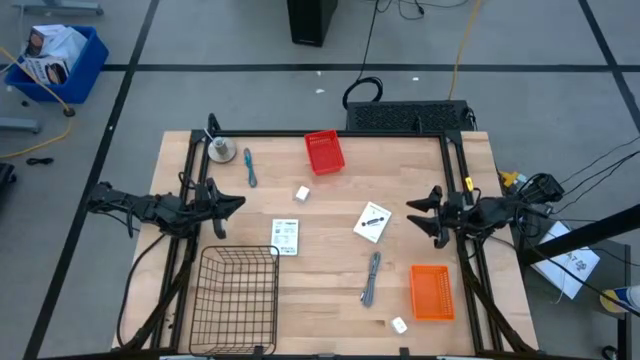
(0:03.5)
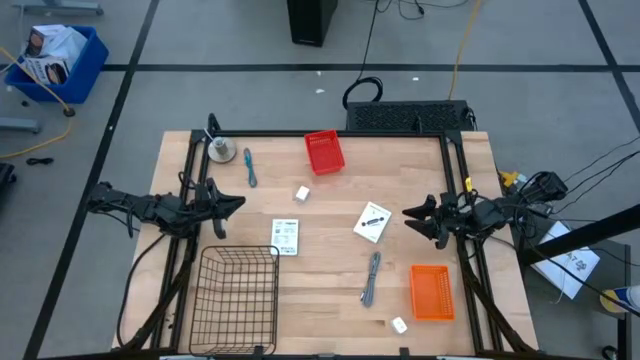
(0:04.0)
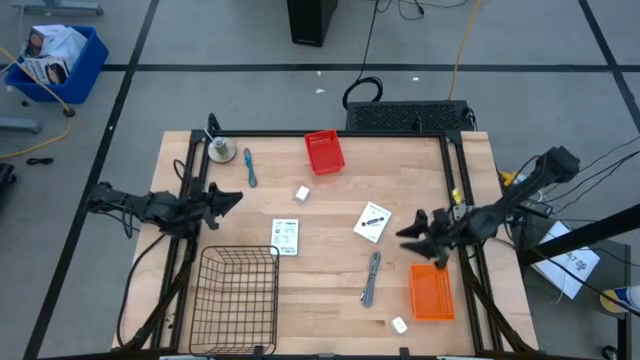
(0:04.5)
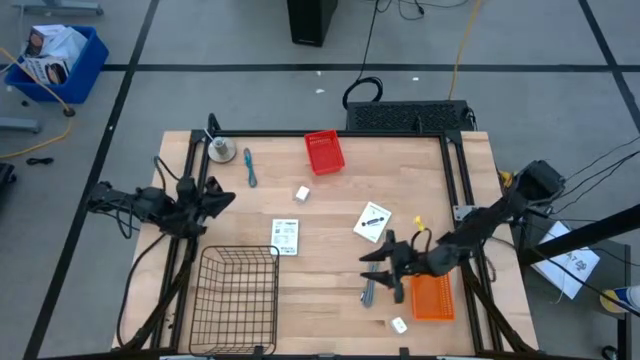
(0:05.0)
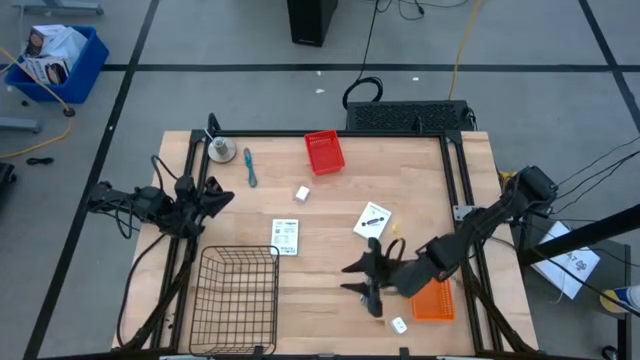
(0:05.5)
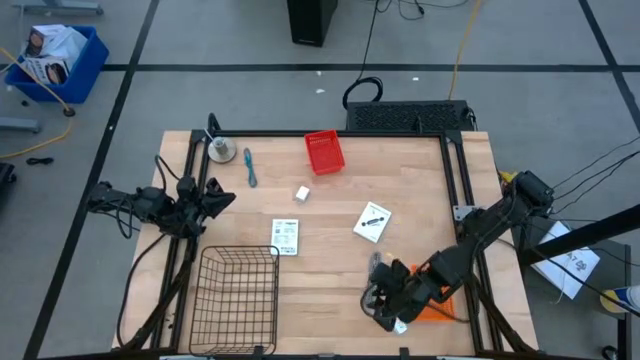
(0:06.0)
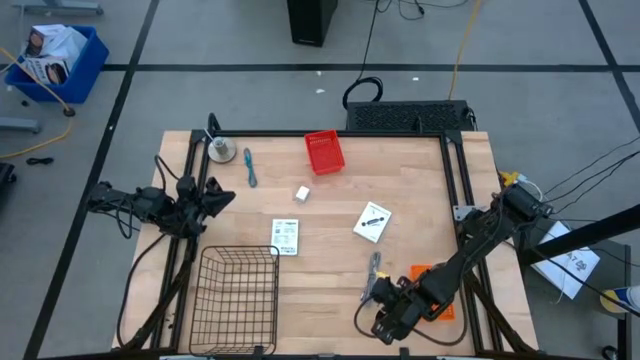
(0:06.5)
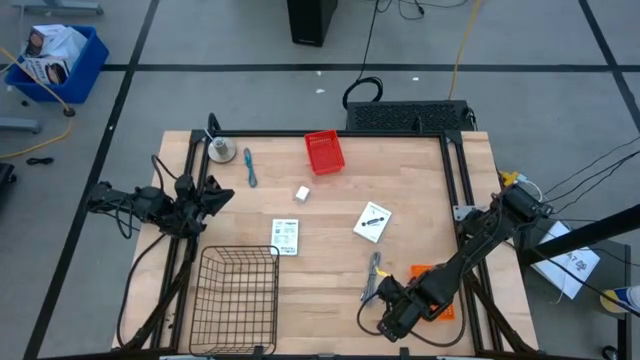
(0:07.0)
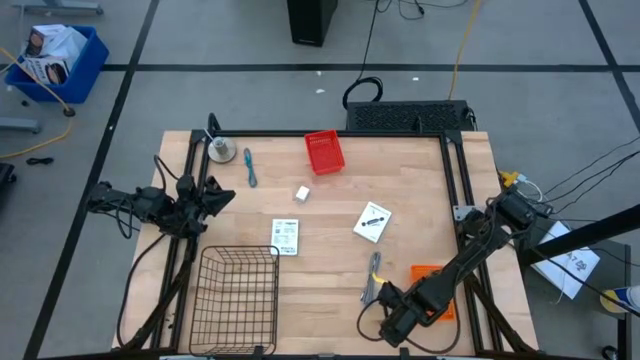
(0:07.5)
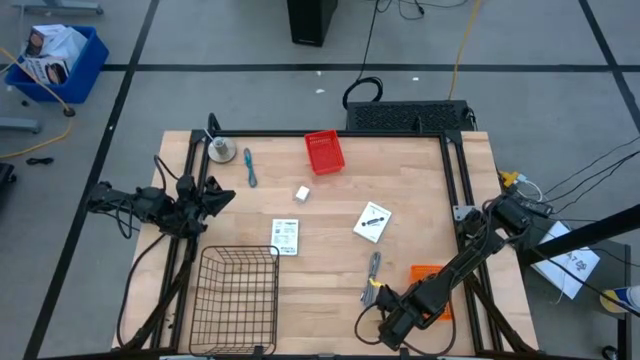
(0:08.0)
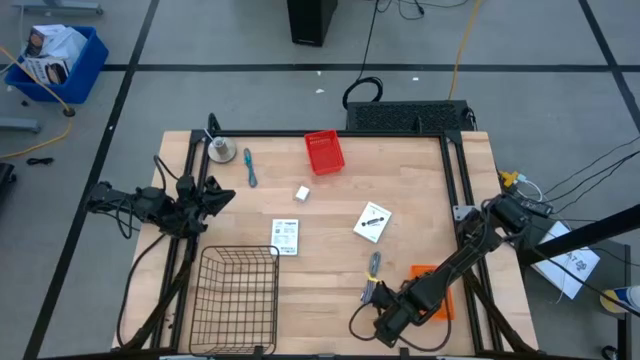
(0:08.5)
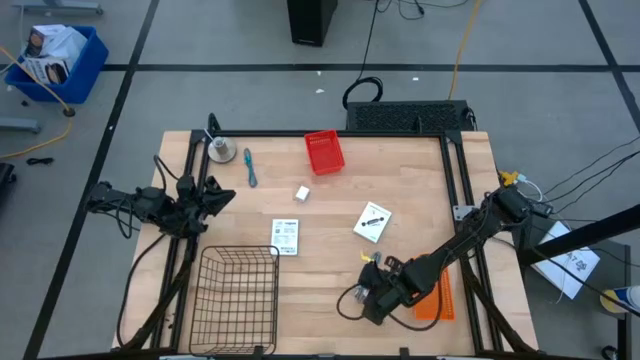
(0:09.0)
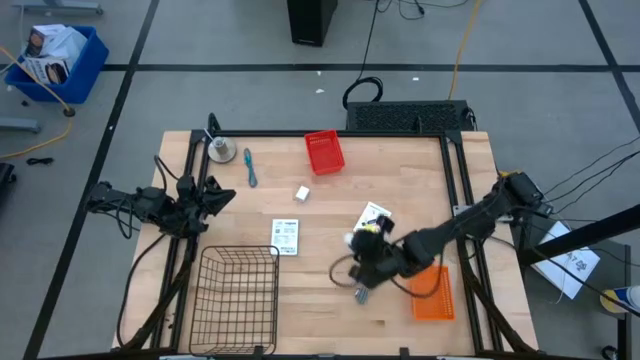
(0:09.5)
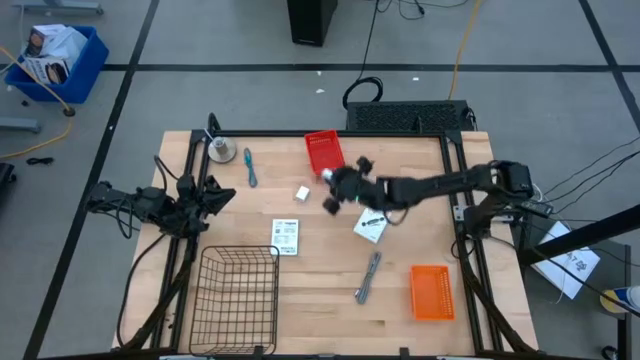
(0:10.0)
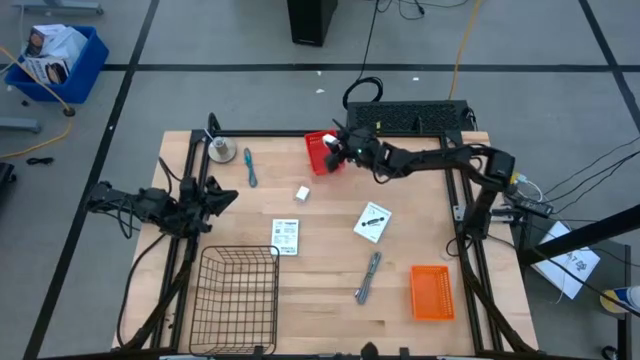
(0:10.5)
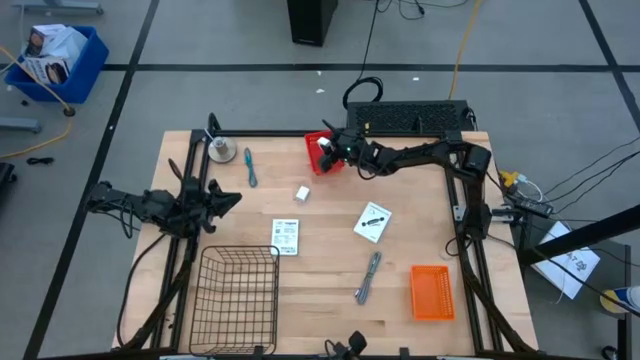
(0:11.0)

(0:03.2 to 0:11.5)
Task: Pick and place items into bin
Put the bottom white charger adapter into the red basket

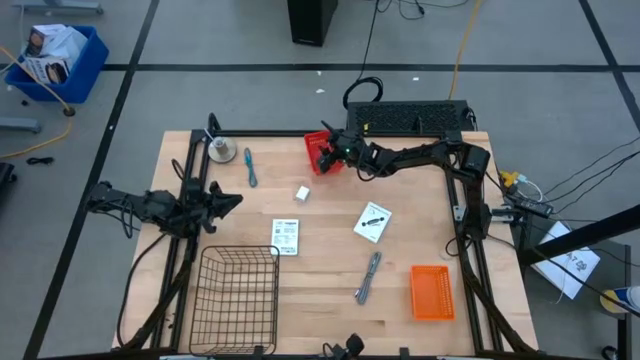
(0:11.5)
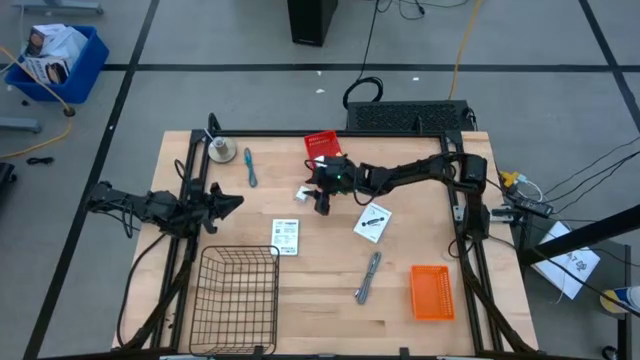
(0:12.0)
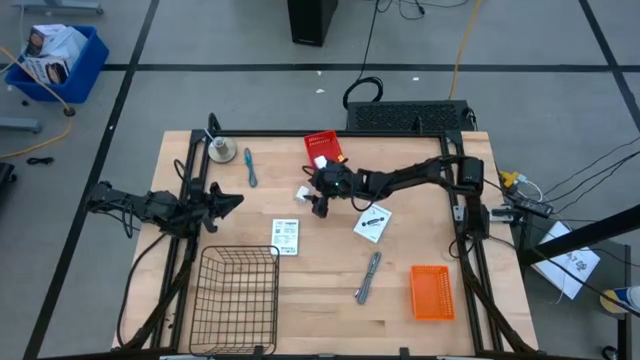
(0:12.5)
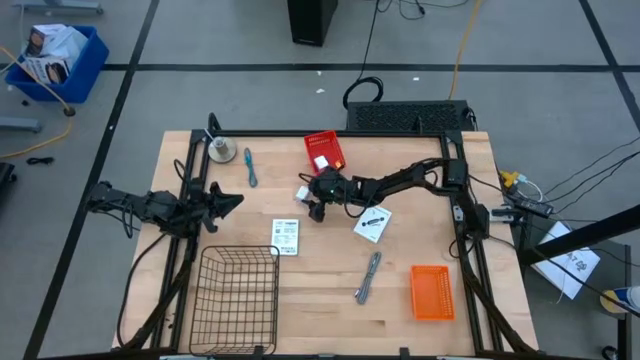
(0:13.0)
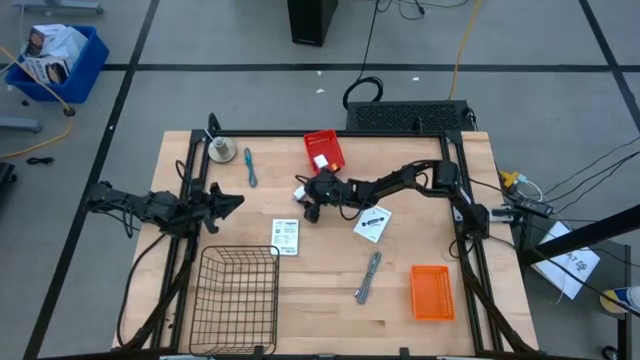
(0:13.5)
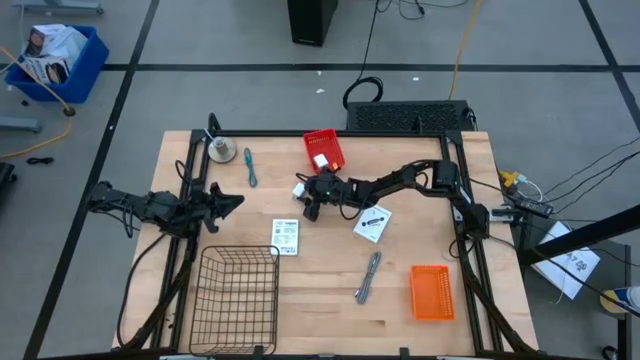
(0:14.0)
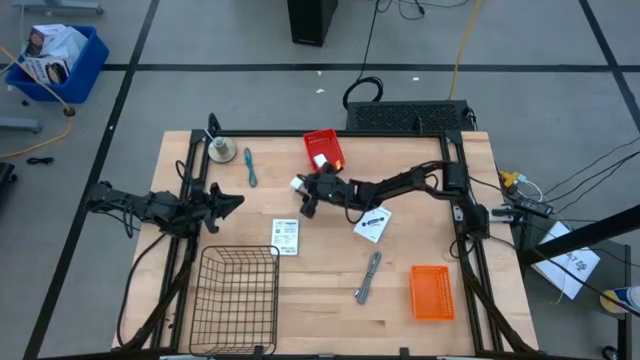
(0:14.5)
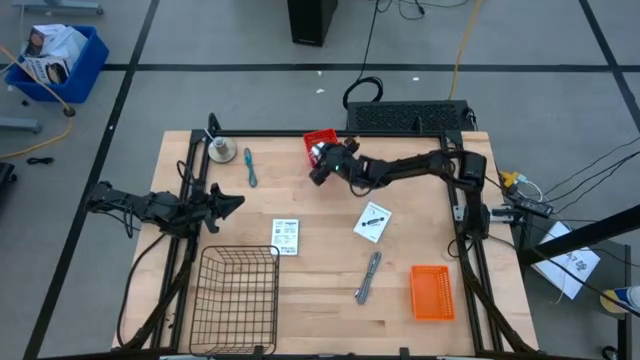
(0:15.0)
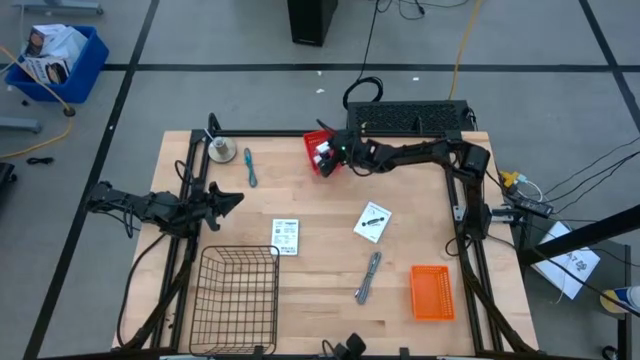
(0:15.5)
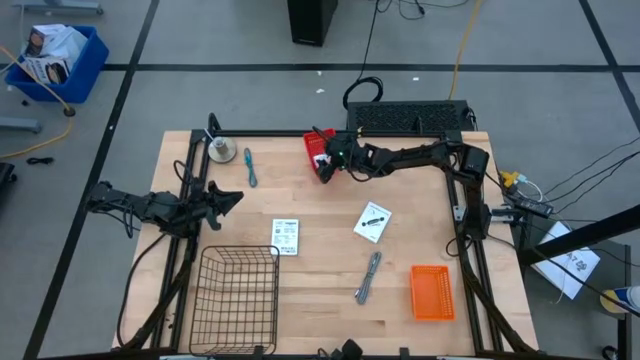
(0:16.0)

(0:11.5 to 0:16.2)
Put the white charger adapter into the red basket

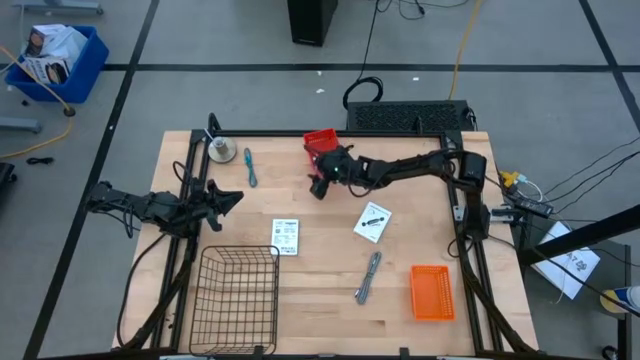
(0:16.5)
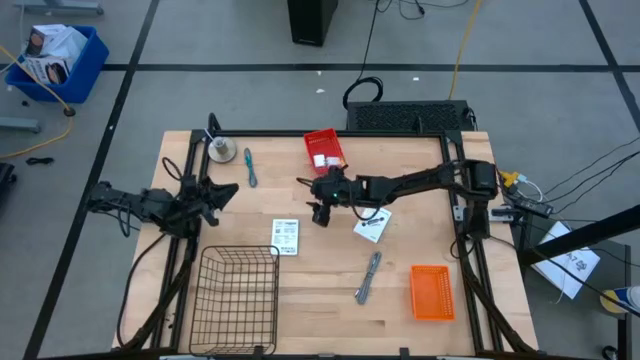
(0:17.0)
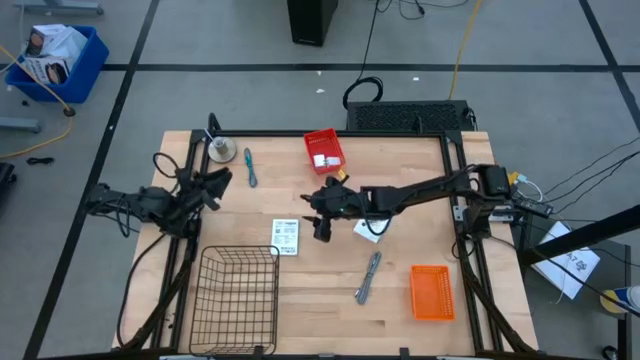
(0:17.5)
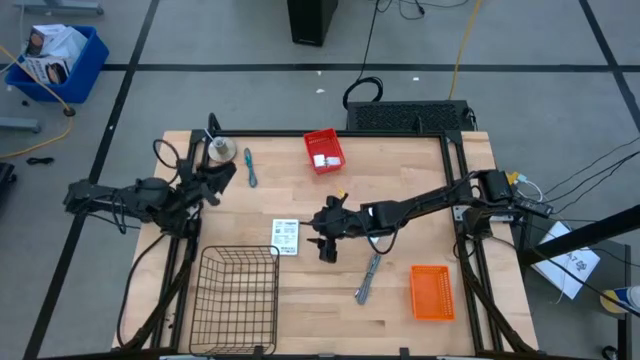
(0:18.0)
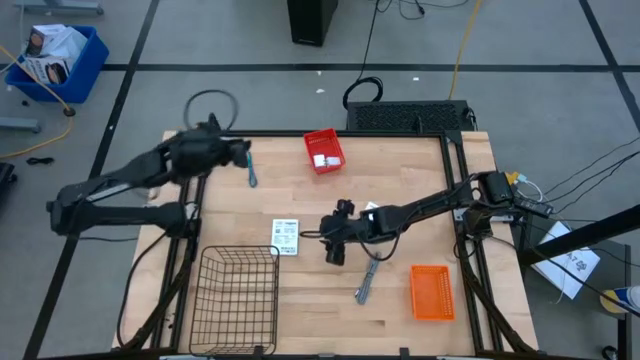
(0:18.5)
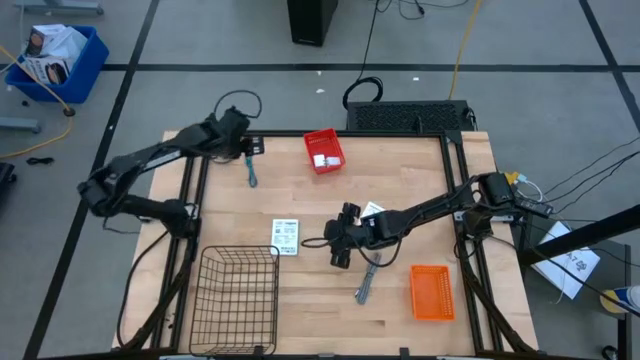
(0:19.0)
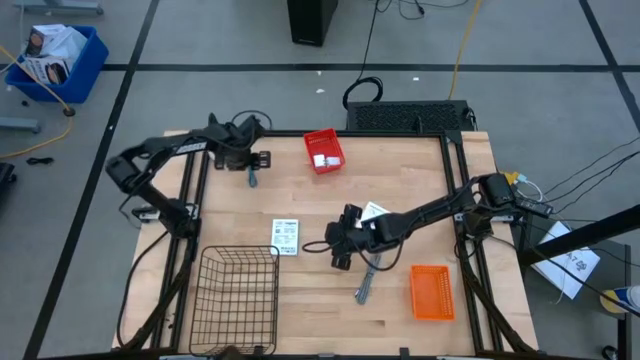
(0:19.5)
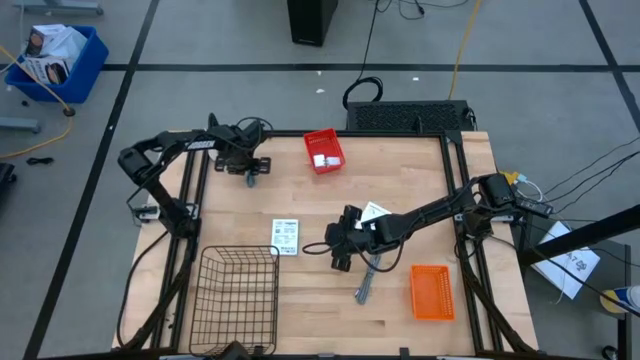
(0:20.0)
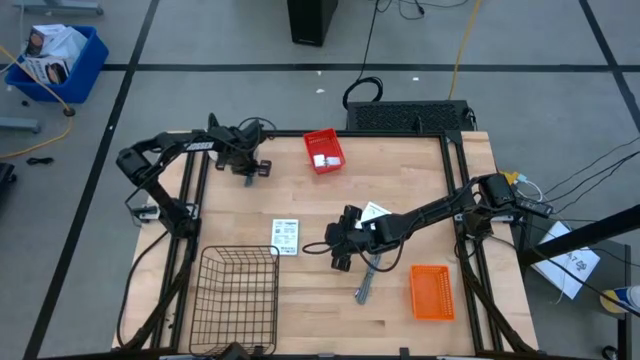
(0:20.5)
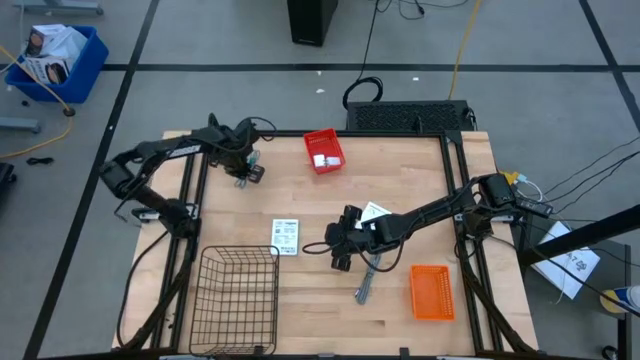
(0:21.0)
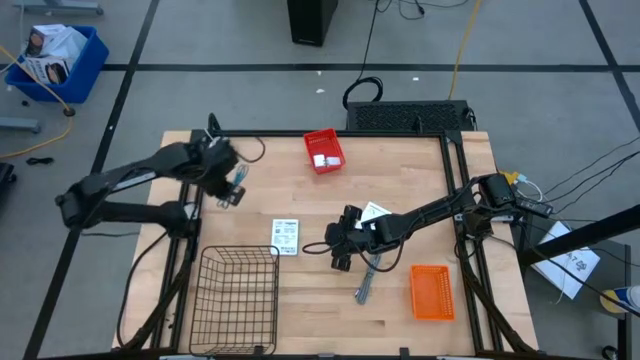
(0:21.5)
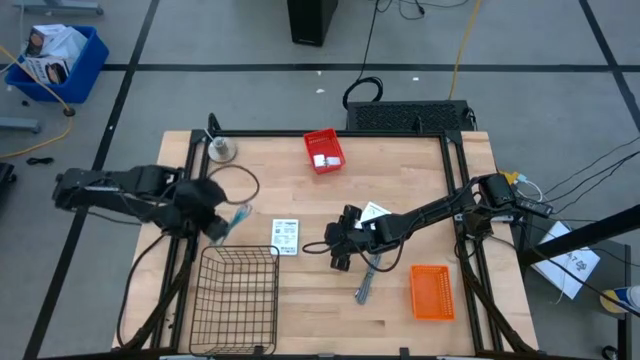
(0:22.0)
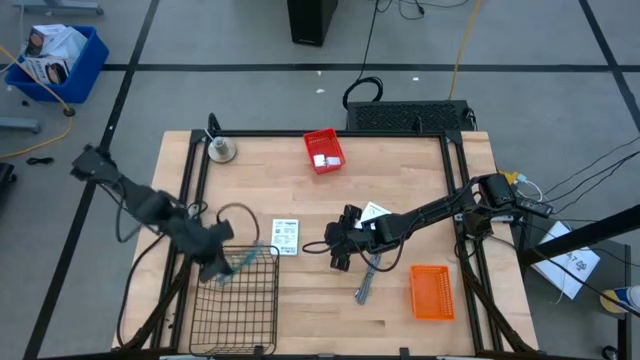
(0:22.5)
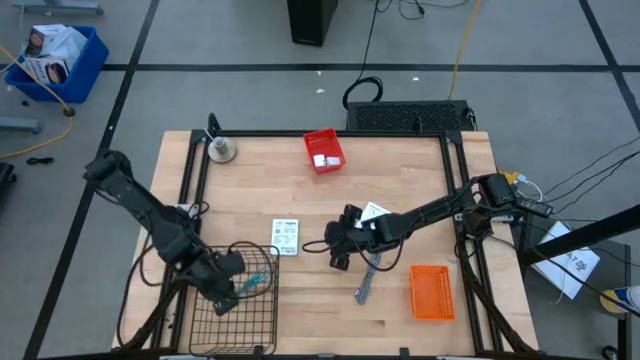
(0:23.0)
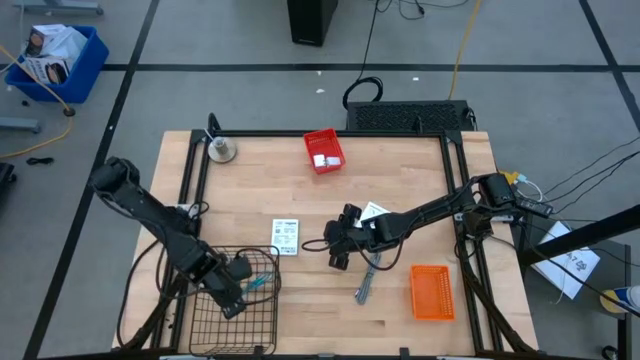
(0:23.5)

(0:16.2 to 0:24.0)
Put the blue stripes charger cable into the wire basket

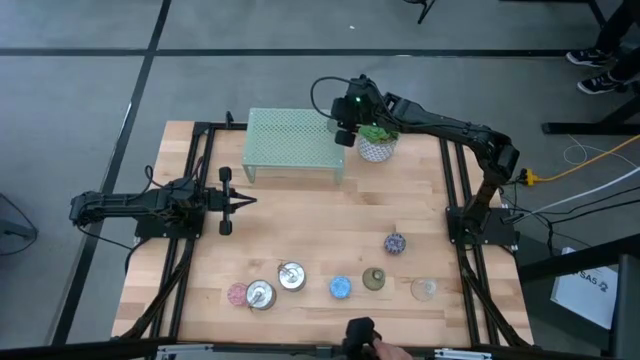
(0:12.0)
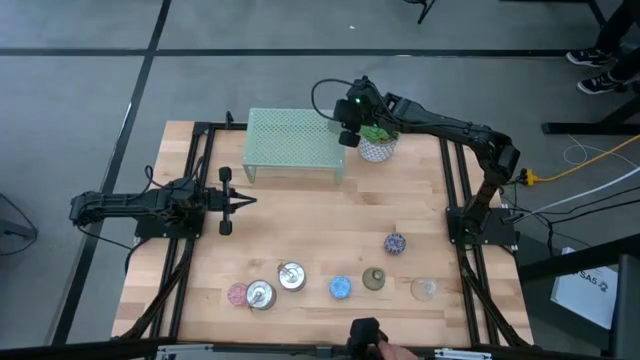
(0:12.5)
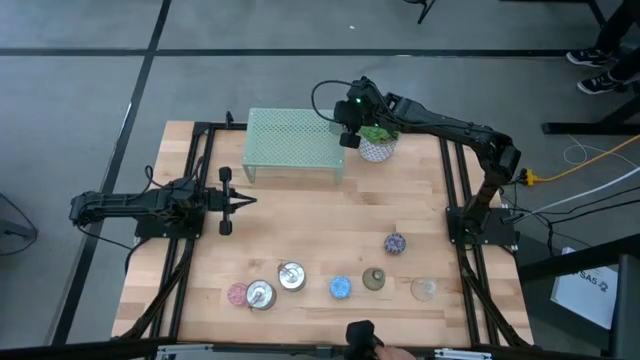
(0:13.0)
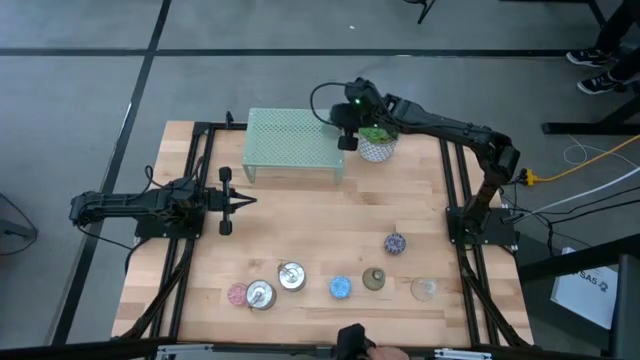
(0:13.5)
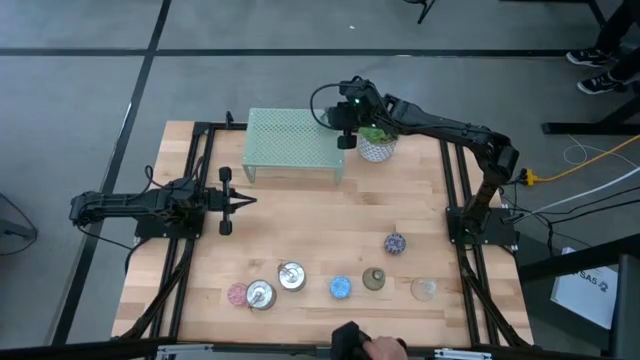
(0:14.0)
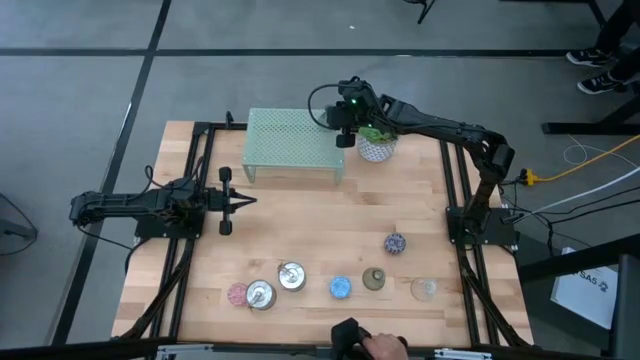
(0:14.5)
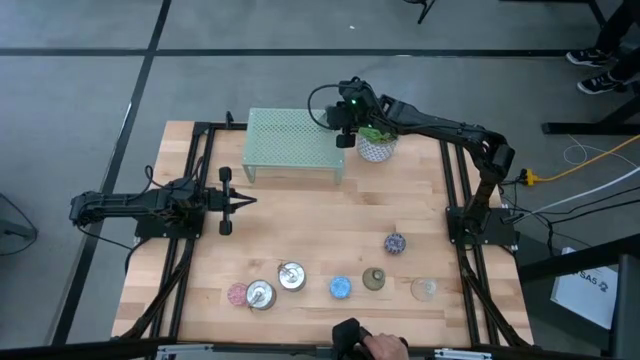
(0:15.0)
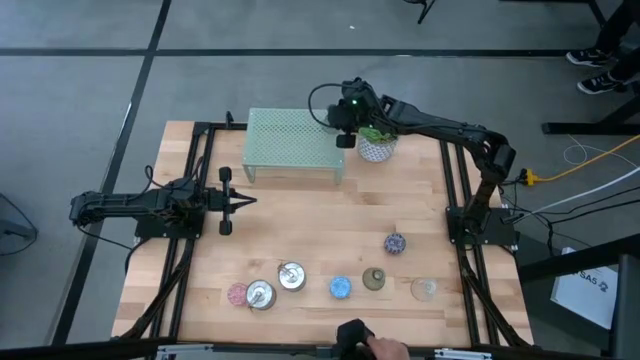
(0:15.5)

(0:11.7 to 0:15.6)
Task: Pick & Place candle stick holders
Adjust the green glass candle holder on the shelf
